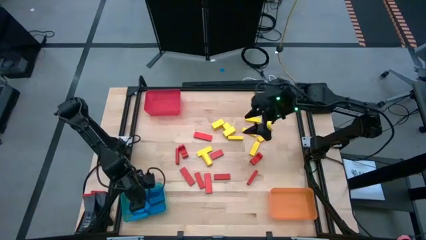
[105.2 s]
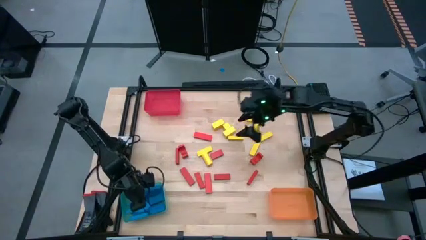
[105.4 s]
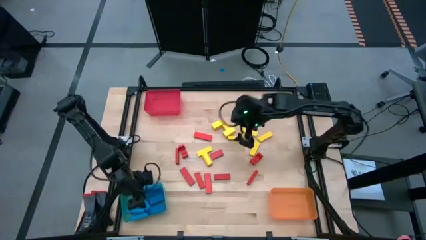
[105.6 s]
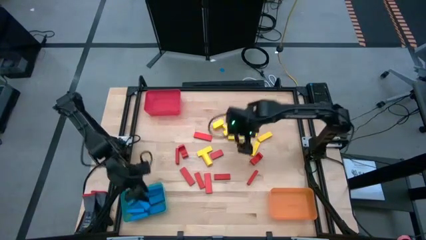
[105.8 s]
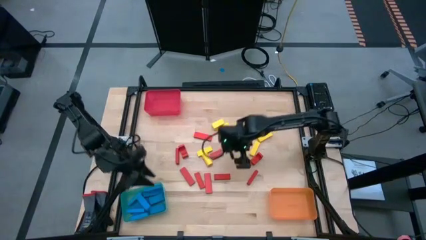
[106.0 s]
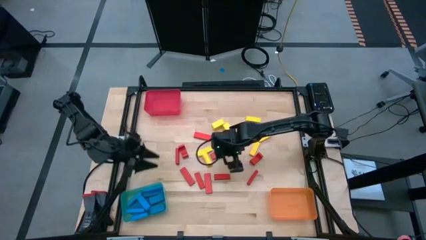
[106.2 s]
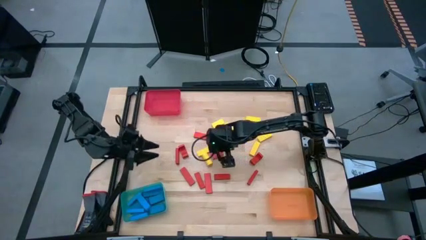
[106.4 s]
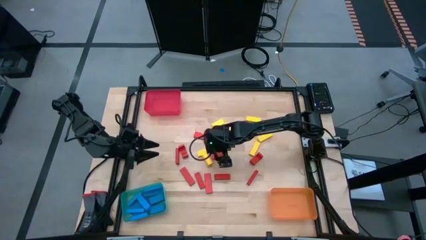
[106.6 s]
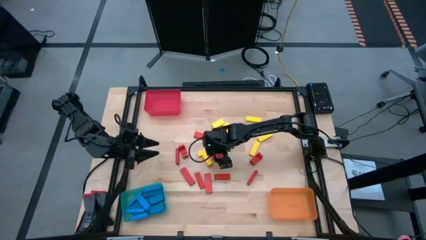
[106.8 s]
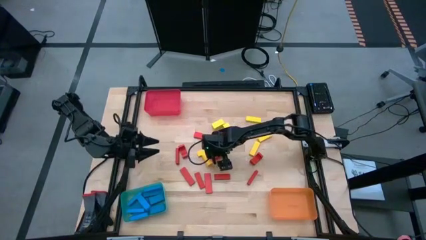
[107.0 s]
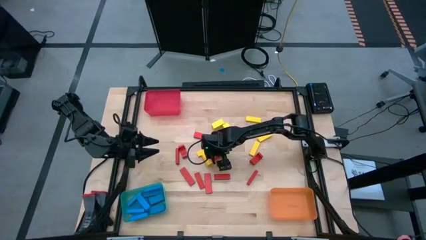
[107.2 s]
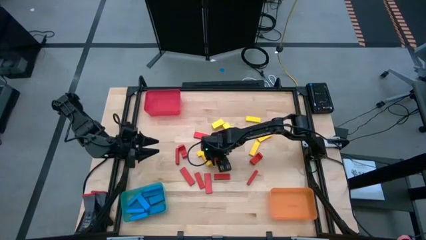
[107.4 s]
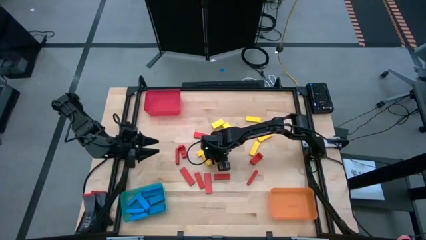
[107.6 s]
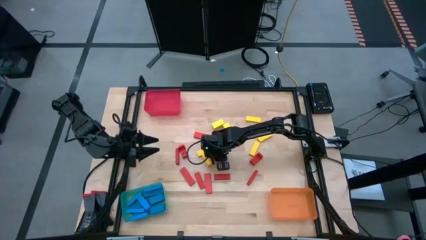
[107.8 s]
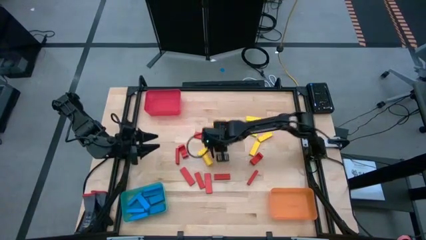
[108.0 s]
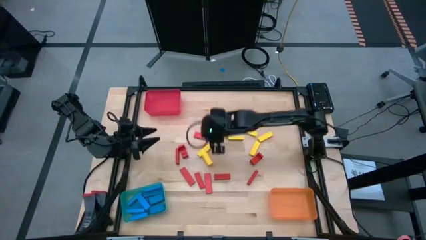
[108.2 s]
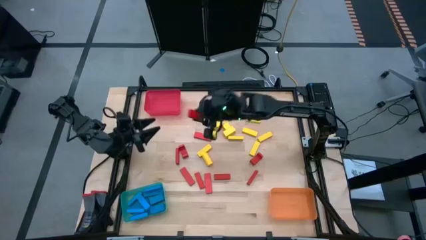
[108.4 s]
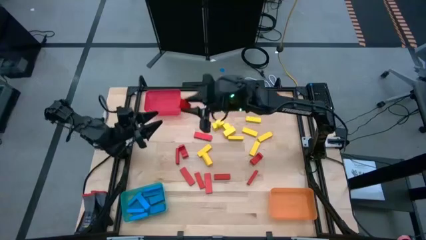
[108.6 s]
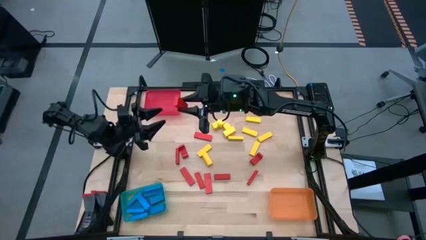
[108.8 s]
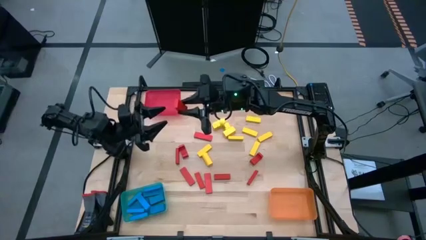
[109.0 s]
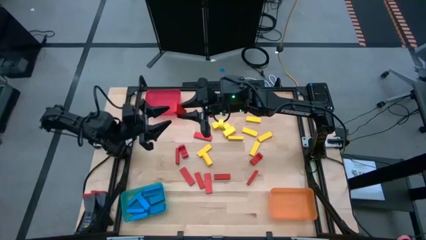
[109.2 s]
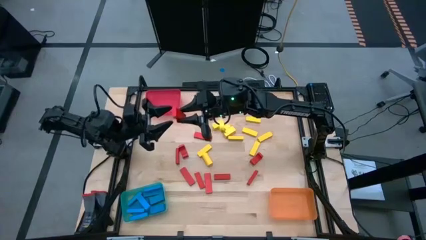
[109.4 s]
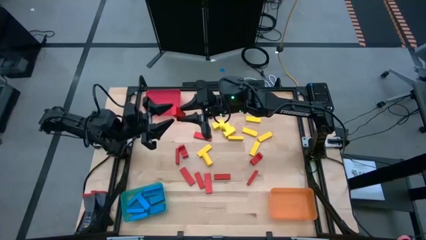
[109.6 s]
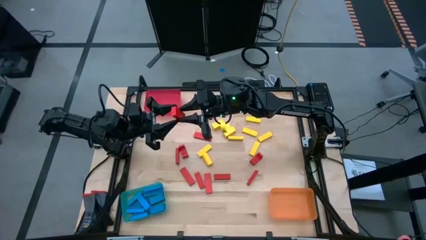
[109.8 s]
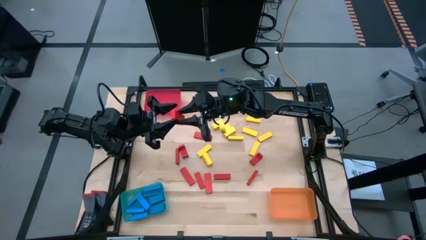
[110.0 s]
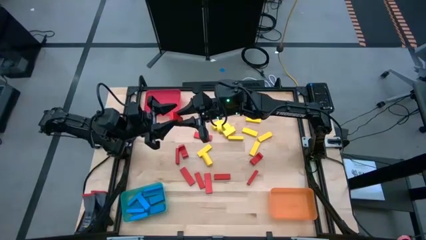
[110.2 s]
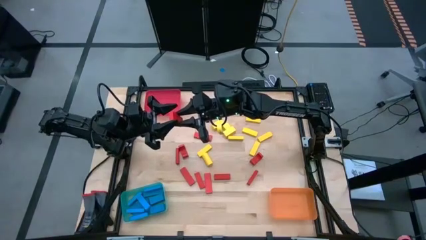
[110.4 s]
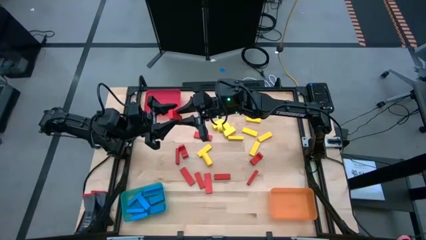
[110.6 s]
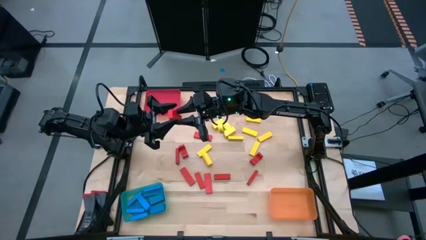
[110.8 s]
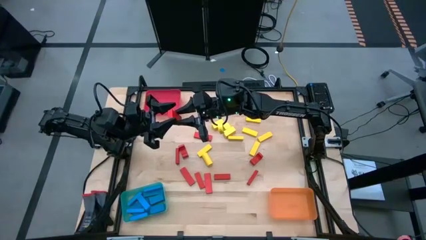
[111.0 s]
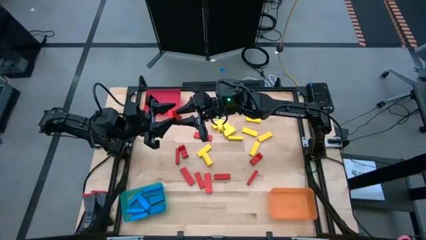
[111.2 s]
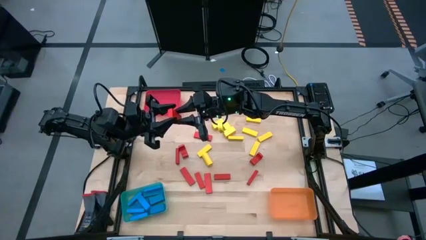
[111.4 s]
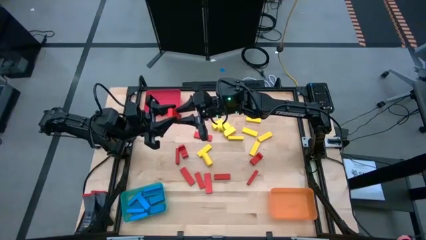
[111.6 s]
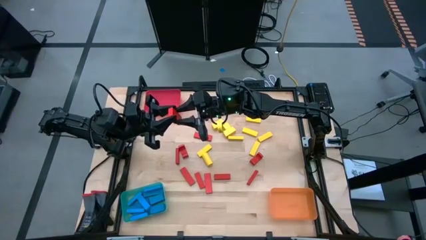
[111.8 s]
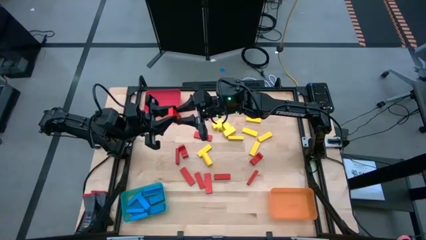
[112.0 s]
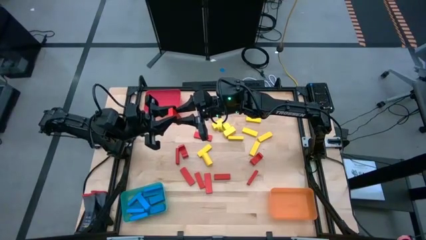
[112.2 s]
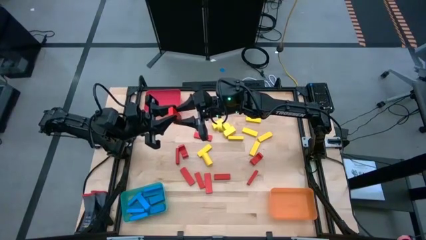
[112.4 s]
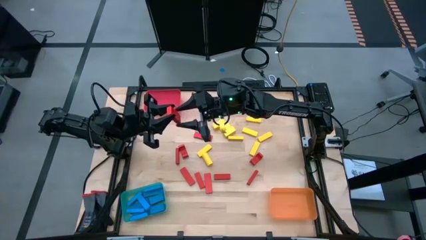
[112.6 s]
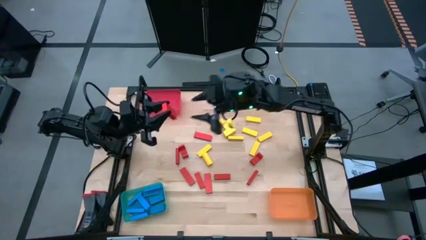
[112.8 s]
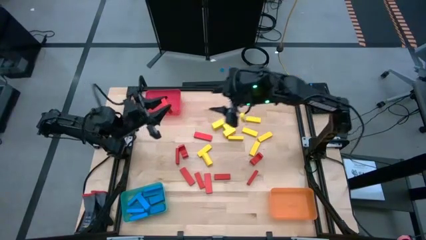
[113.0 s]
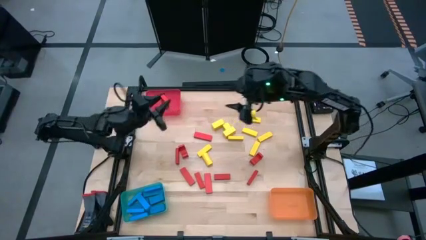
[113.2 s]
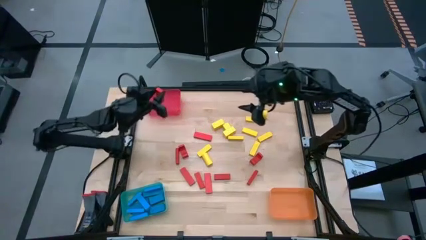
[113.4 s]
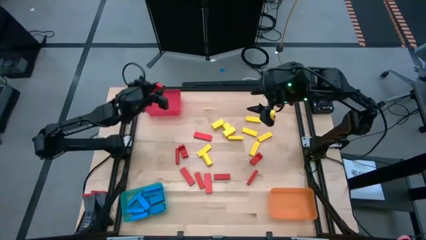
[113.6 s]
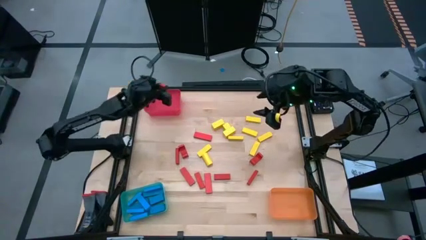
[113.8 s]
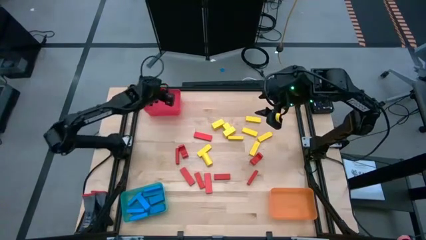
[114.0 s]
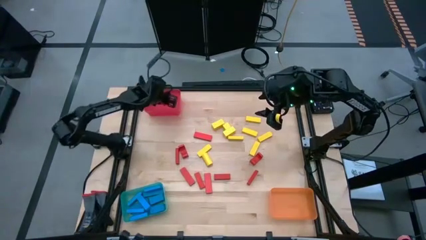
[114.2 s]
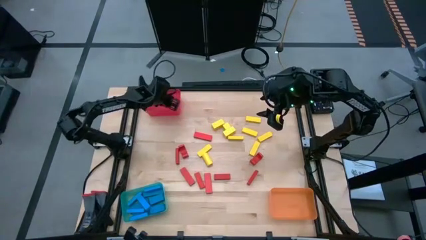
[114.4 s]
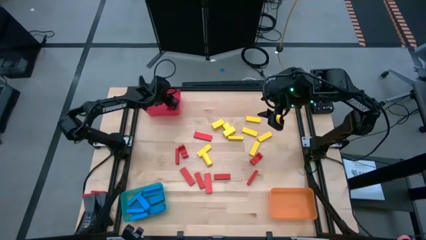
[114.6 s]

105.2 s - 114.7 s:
Task: Sort blocks
Put the red block into the red bin

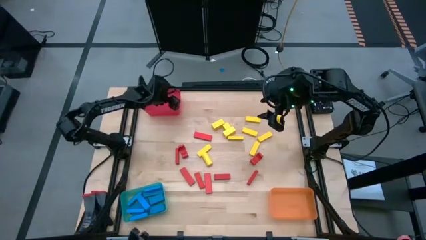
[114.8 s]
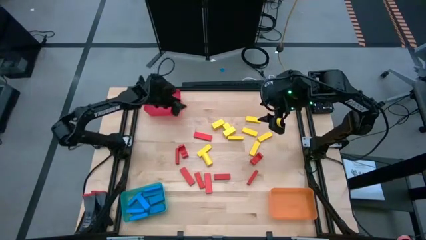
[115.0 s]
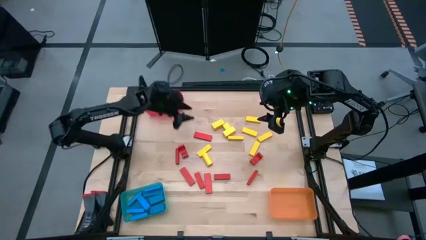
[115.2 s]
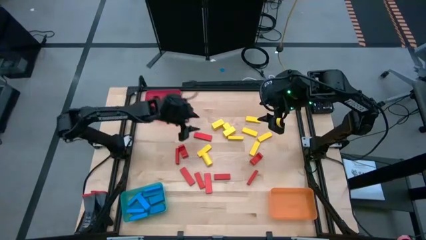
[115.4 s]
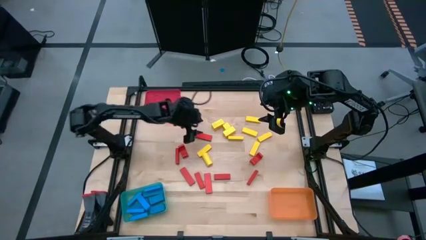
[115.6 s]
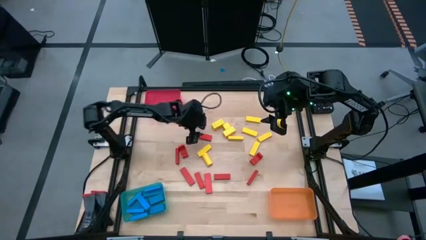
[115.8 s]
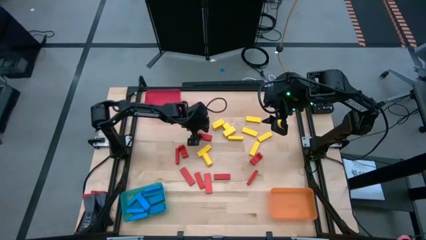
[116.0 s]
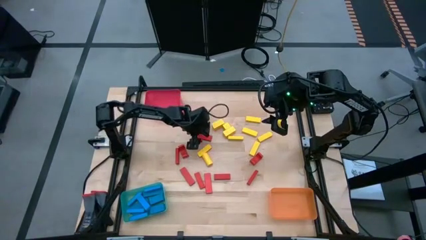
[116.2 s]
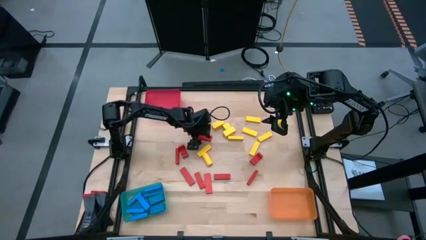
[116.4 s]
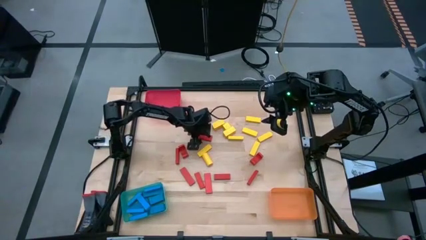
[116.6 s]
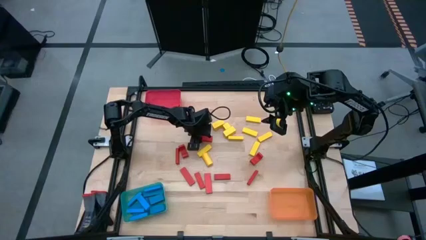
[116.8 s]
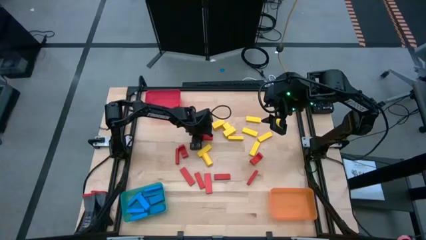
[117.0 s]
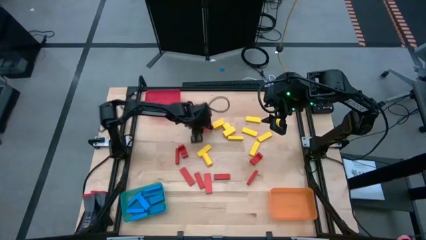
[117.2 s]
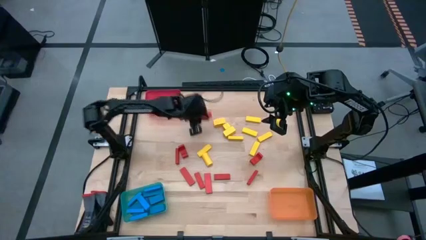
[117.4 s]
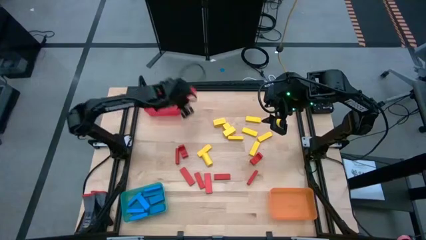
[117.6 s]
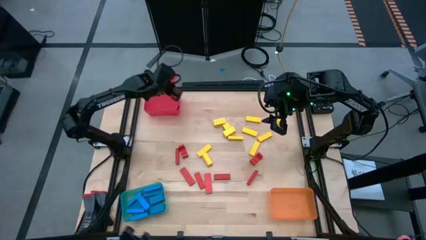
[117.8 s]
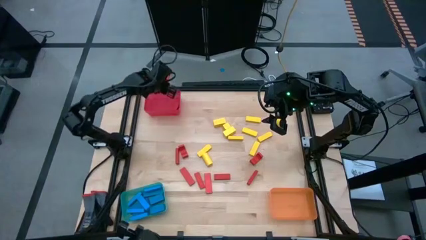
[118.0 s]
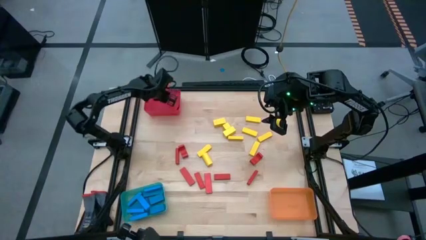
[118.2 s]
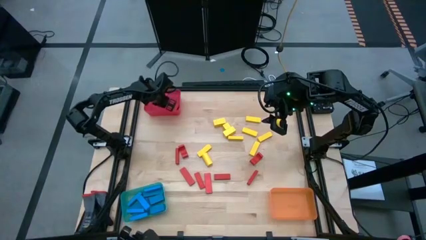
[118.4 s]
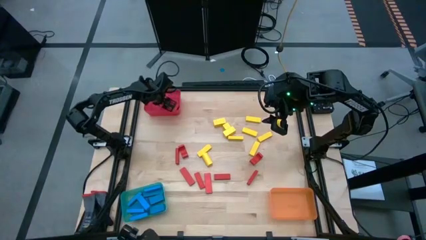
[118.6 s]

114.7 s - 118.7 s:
Put the red block into the red bin

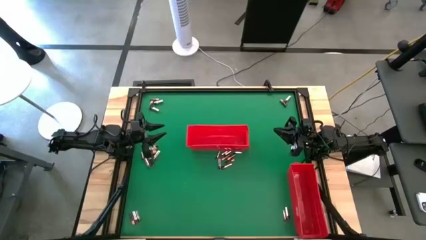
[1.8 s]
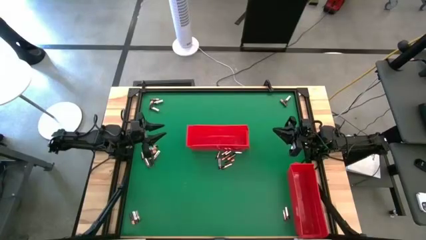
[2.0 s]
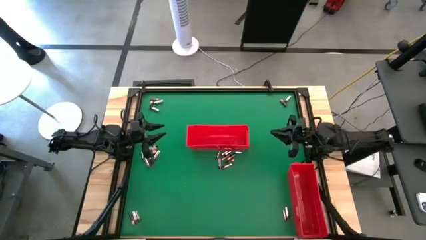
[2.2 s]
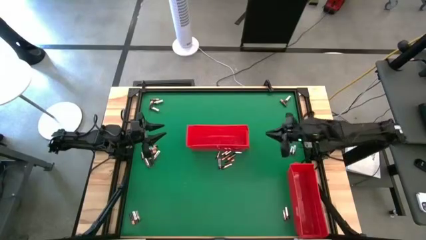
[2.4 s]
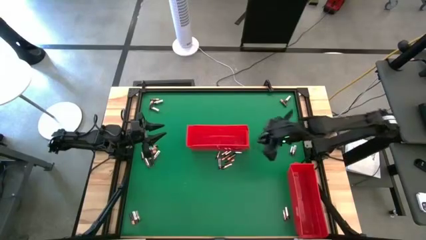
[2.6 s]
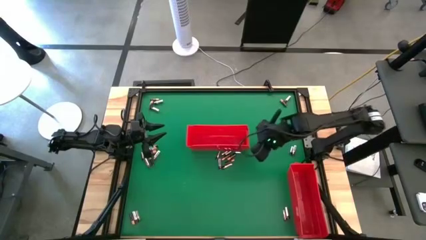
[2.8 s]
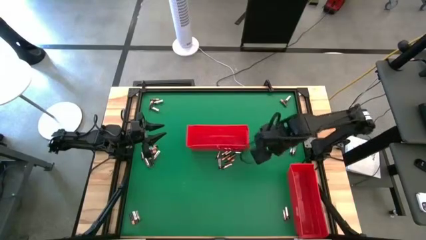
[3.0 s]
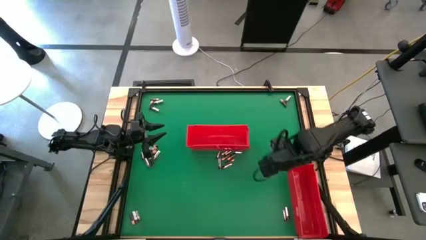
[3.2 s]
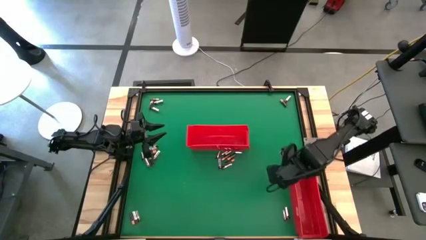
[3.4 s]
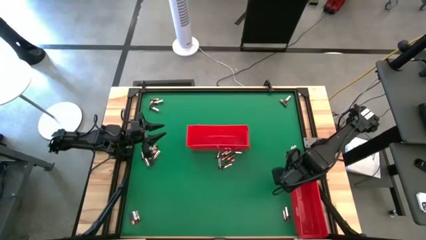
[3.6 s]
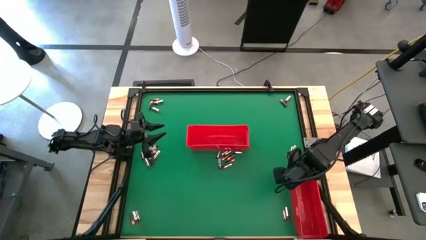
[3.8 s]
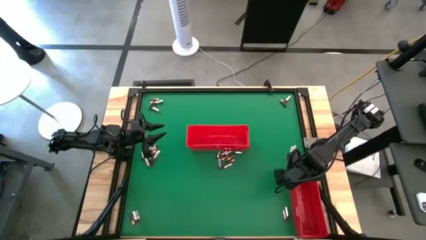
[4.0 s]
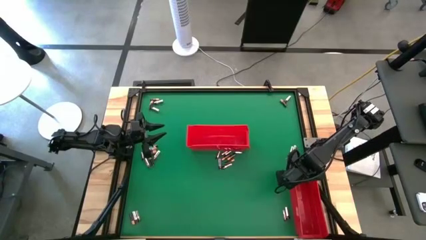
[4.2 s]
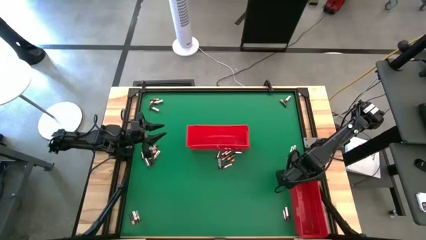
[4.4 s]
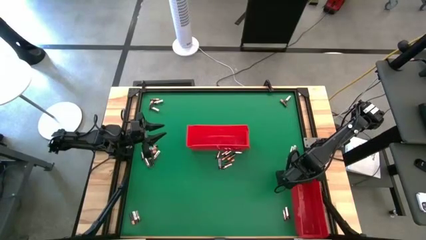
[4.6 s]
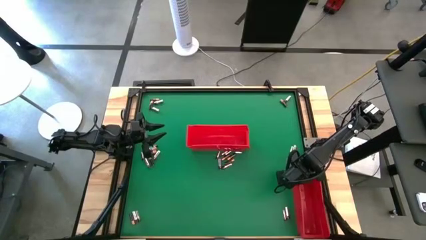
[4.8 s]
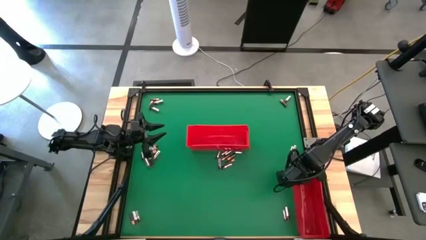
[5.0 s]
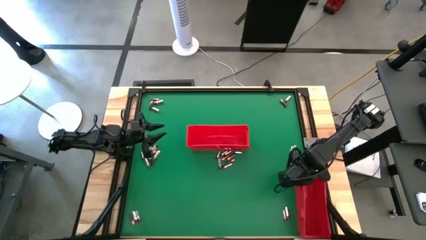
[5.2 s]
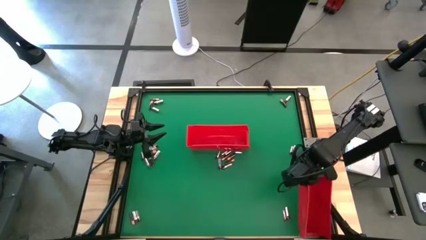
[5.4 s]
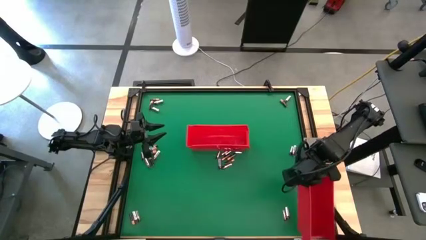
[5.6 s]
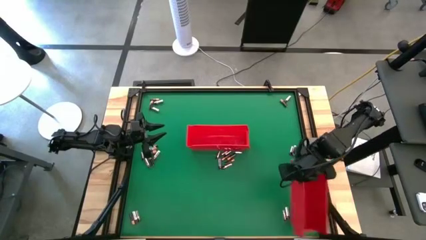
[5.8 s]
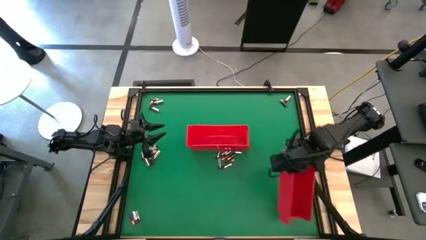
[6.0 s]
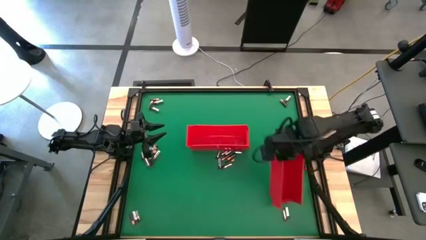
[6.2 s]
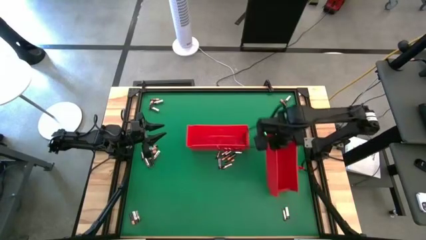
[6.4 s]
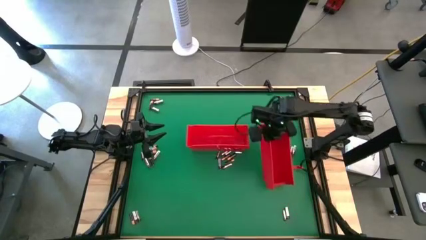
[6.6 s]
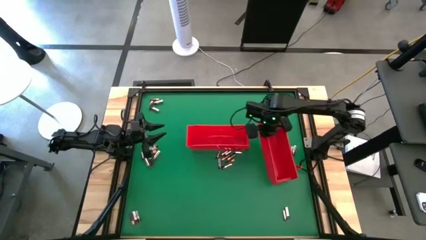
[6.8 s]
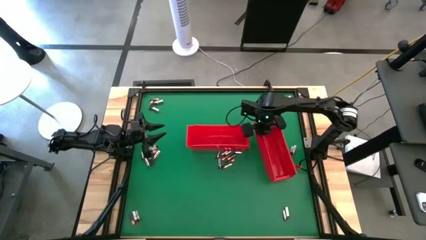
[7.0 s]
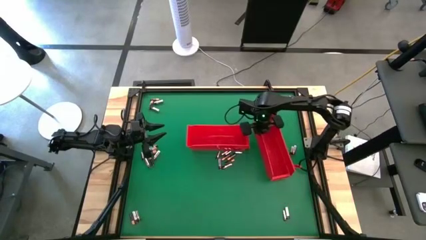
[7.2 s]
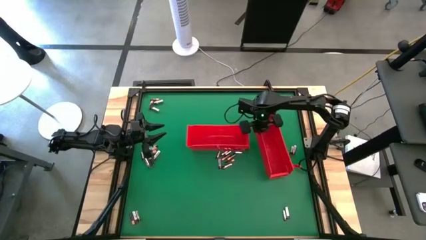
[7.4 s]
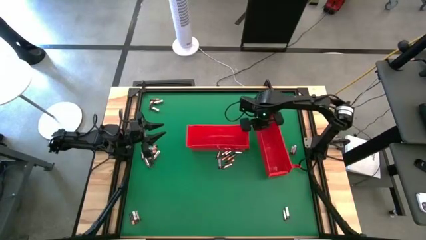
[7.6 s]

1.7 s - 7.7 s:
Task: Sort batteries
Move the bottom red bin to the right side of the table
